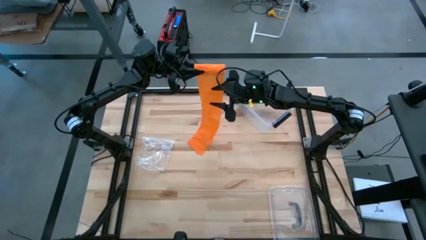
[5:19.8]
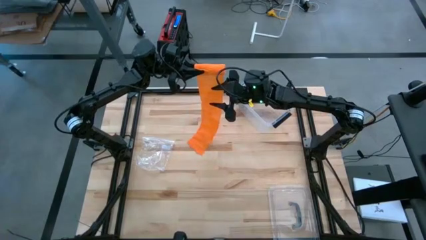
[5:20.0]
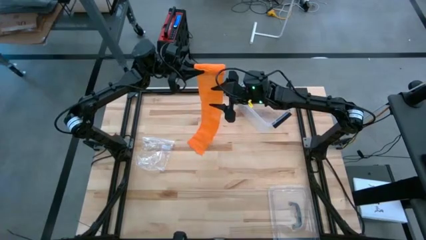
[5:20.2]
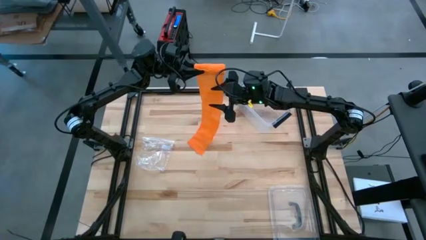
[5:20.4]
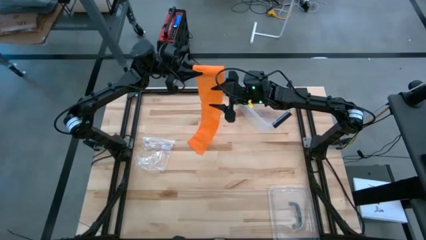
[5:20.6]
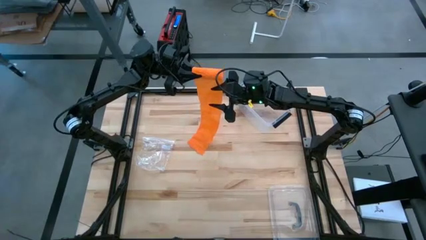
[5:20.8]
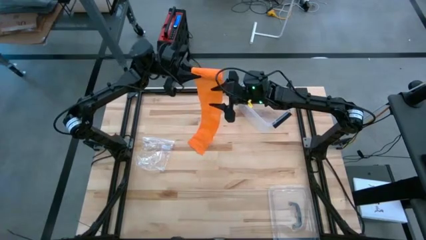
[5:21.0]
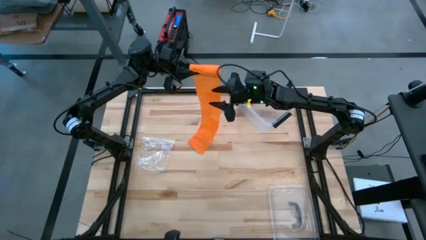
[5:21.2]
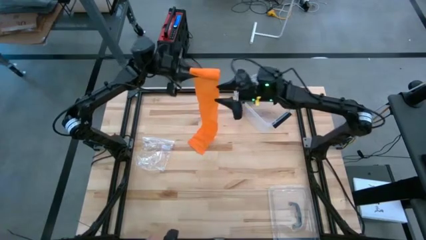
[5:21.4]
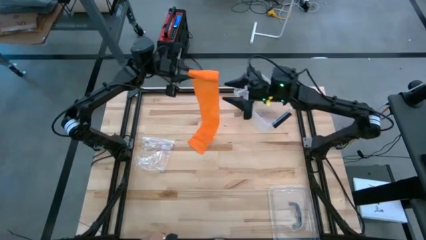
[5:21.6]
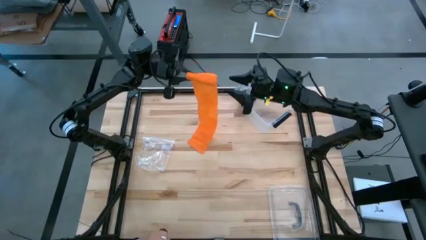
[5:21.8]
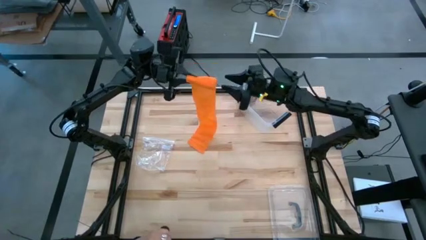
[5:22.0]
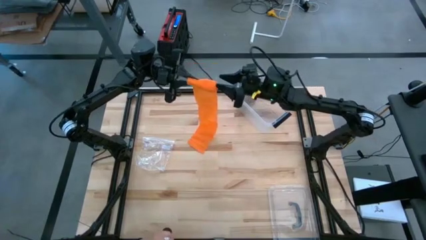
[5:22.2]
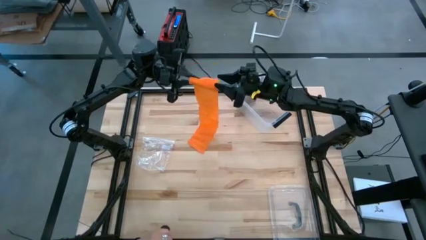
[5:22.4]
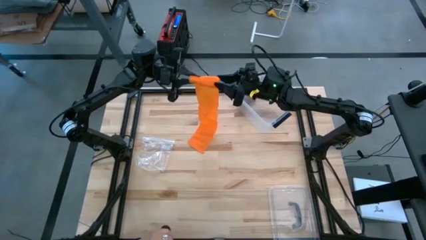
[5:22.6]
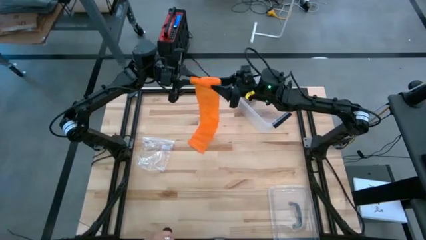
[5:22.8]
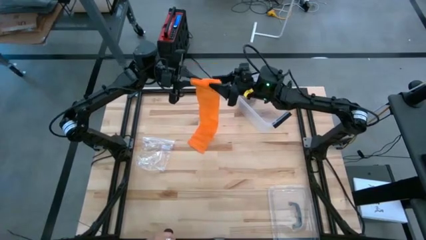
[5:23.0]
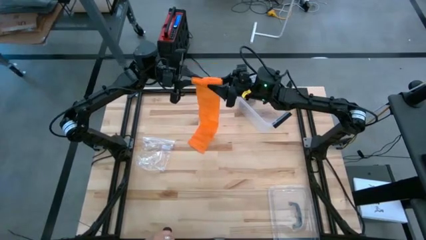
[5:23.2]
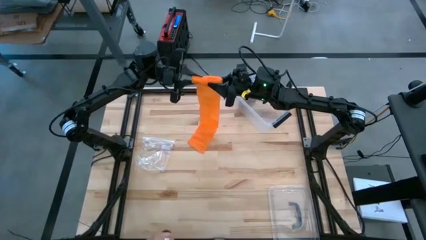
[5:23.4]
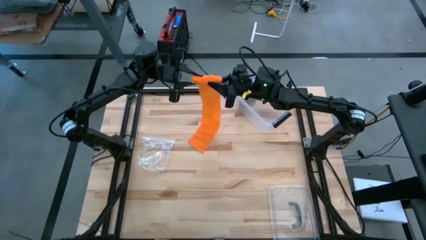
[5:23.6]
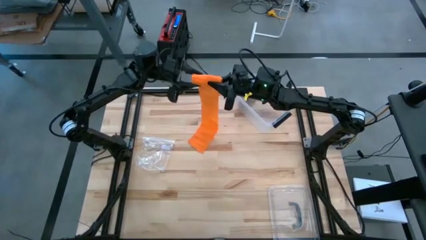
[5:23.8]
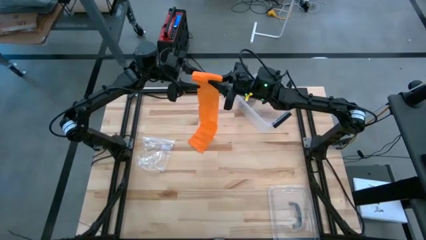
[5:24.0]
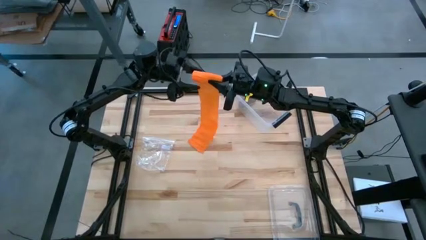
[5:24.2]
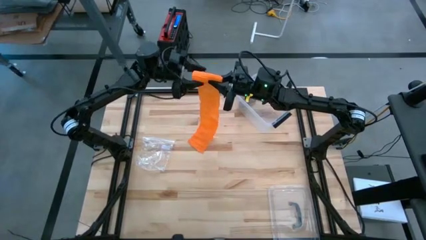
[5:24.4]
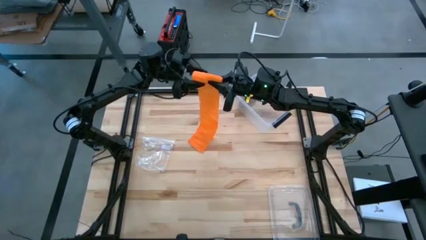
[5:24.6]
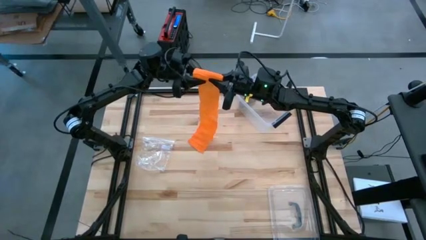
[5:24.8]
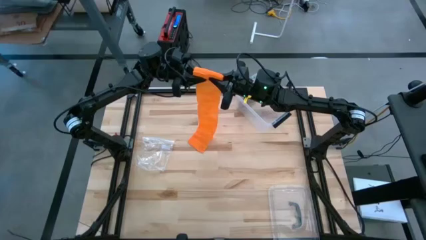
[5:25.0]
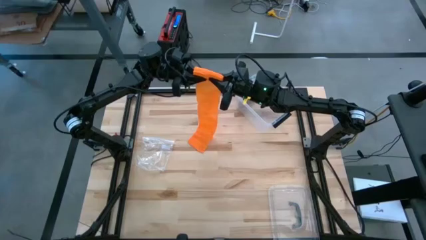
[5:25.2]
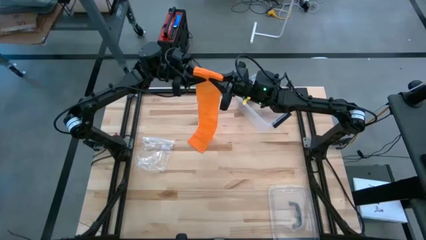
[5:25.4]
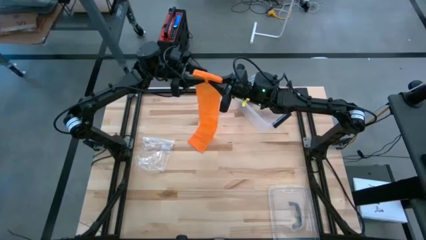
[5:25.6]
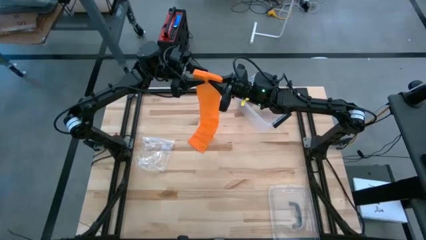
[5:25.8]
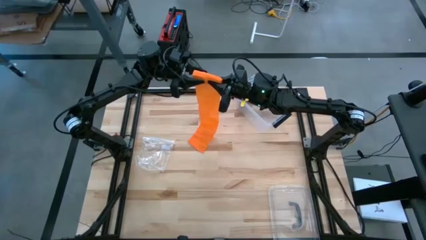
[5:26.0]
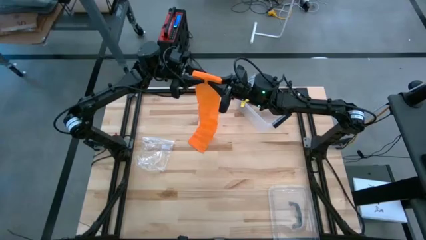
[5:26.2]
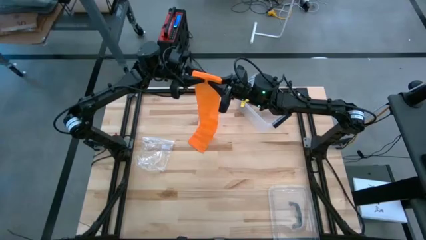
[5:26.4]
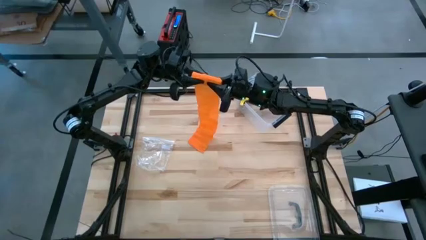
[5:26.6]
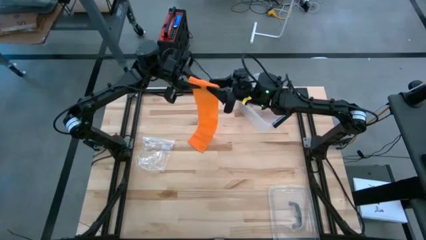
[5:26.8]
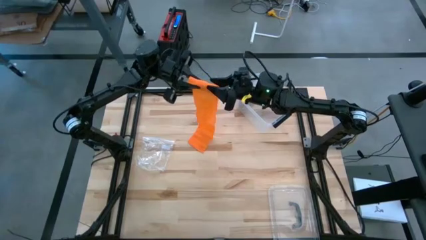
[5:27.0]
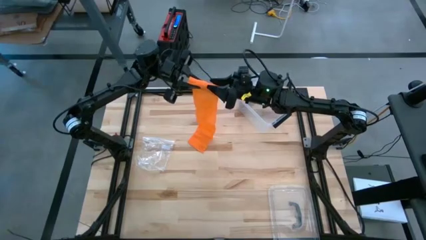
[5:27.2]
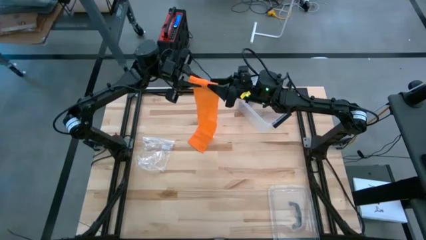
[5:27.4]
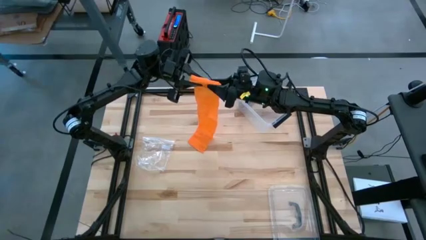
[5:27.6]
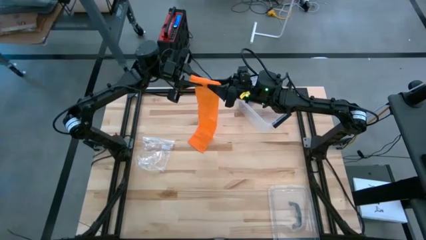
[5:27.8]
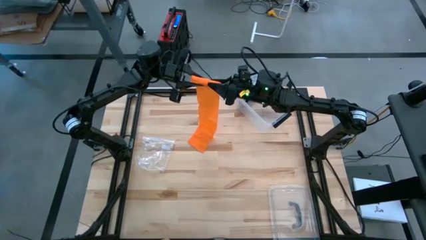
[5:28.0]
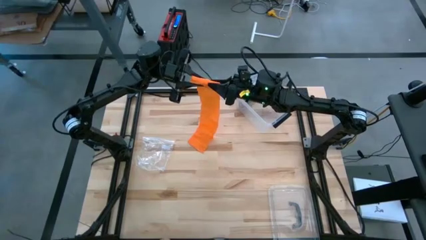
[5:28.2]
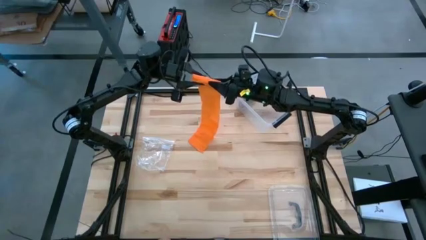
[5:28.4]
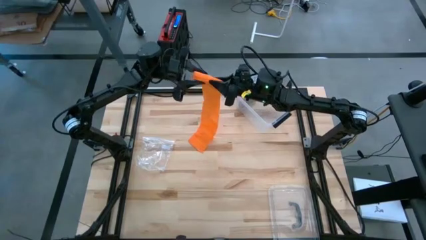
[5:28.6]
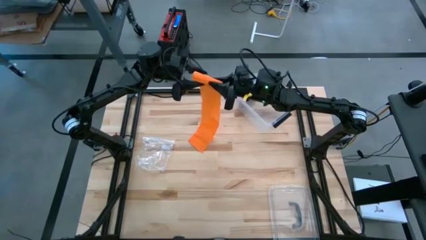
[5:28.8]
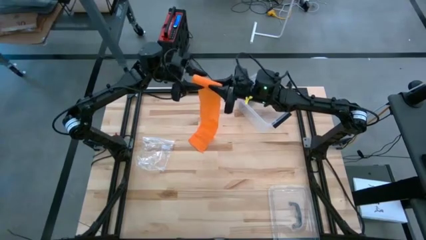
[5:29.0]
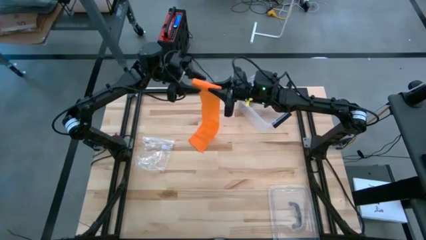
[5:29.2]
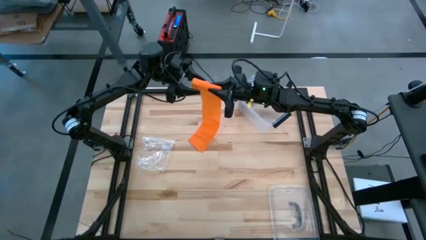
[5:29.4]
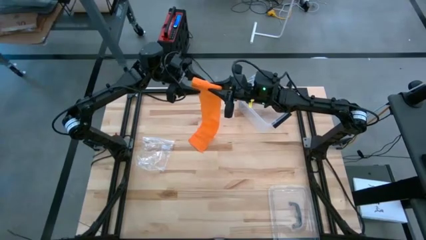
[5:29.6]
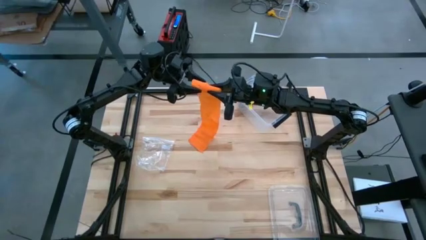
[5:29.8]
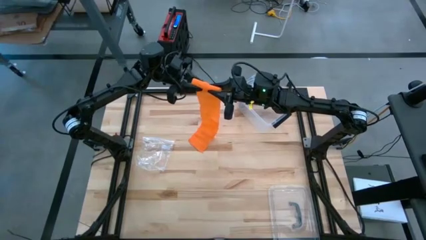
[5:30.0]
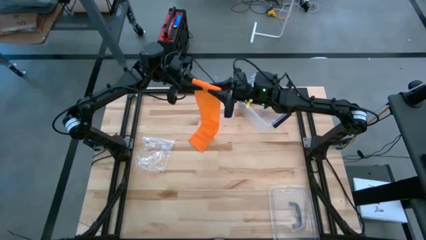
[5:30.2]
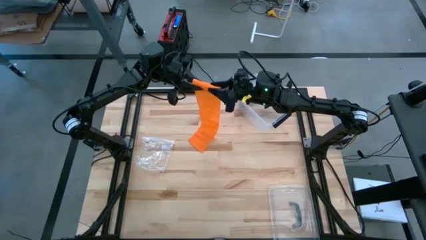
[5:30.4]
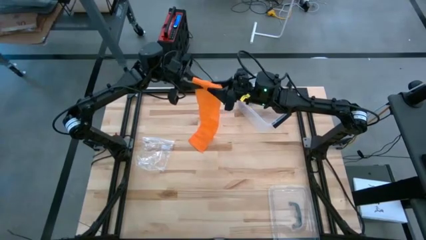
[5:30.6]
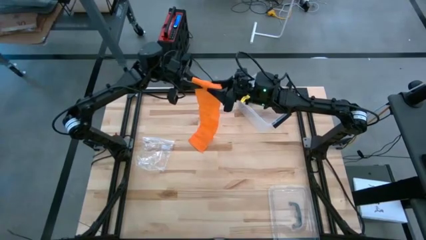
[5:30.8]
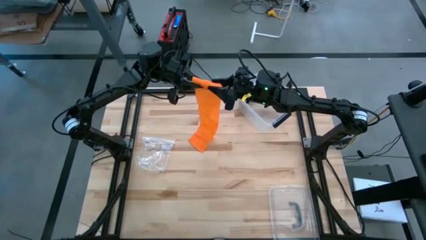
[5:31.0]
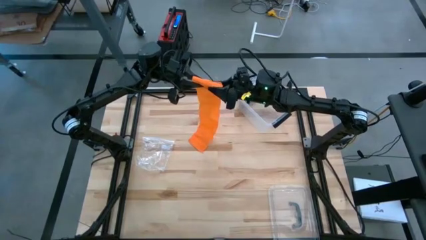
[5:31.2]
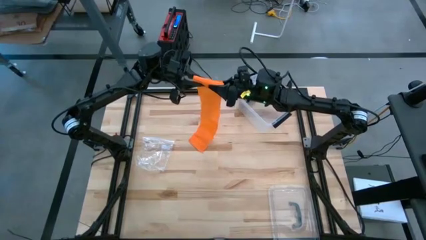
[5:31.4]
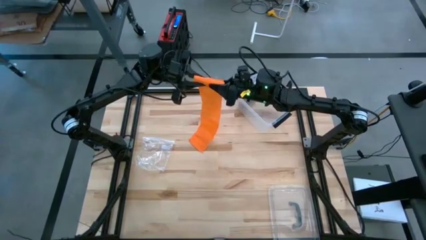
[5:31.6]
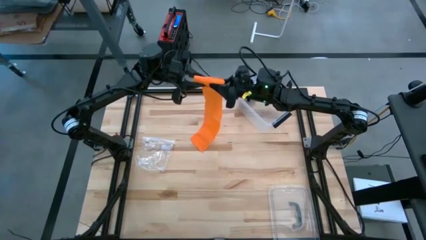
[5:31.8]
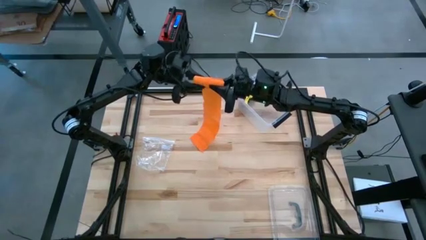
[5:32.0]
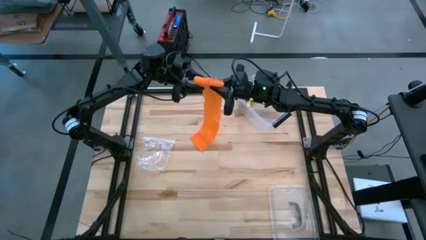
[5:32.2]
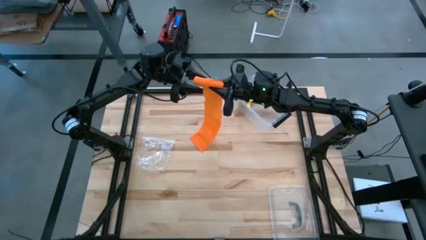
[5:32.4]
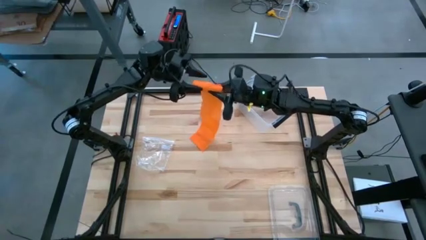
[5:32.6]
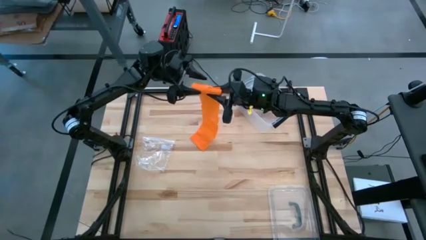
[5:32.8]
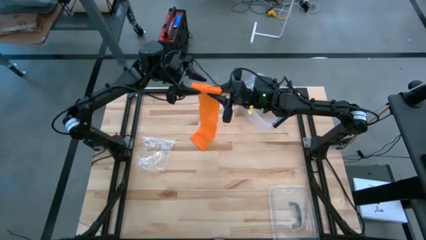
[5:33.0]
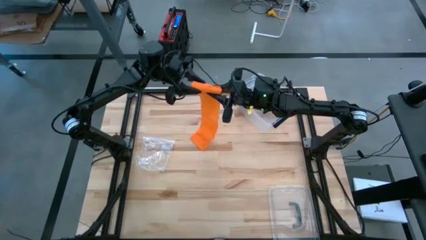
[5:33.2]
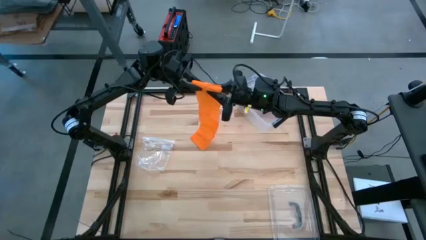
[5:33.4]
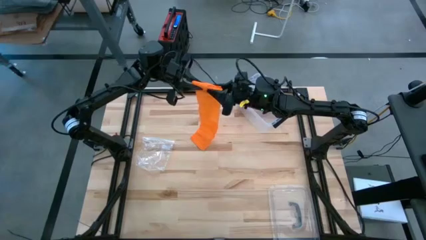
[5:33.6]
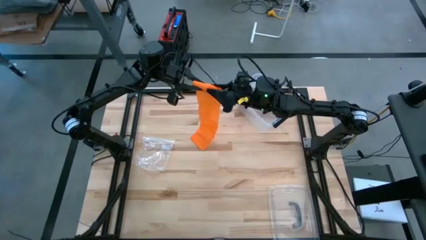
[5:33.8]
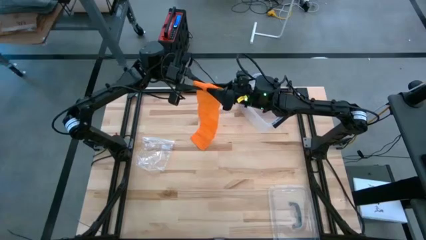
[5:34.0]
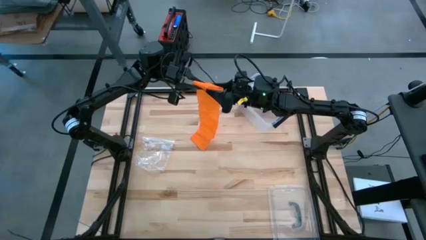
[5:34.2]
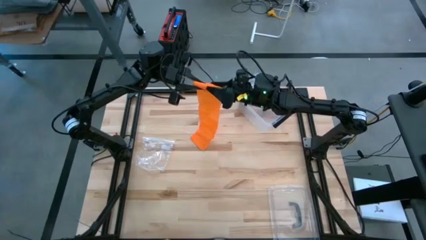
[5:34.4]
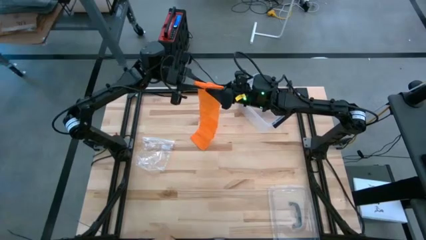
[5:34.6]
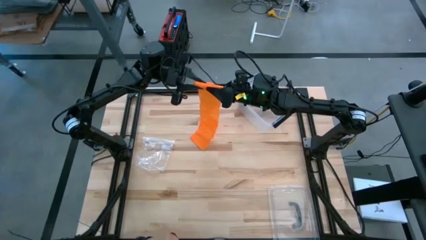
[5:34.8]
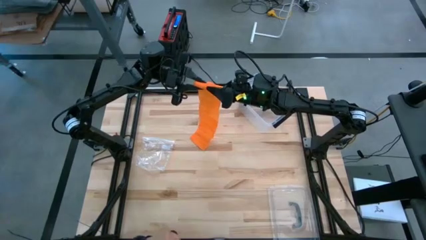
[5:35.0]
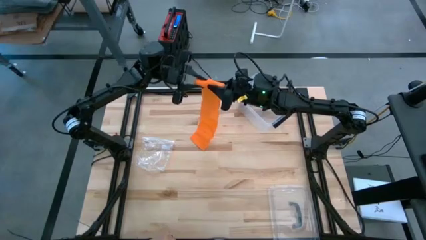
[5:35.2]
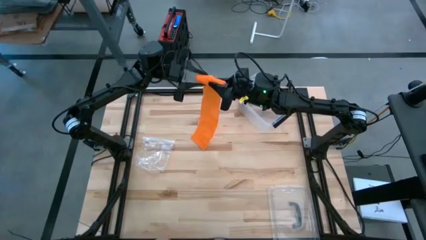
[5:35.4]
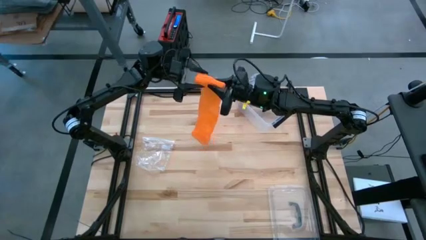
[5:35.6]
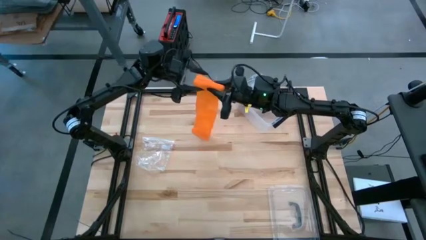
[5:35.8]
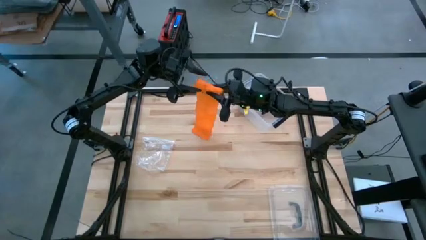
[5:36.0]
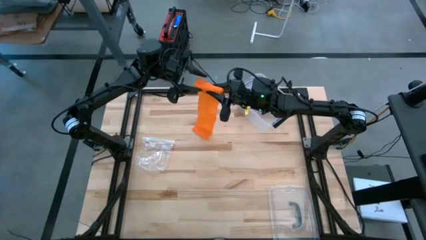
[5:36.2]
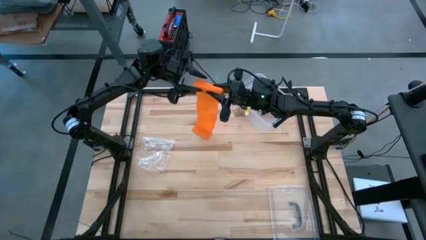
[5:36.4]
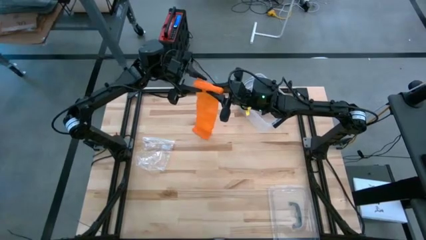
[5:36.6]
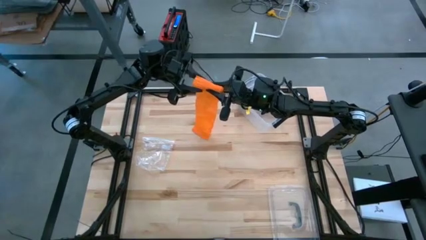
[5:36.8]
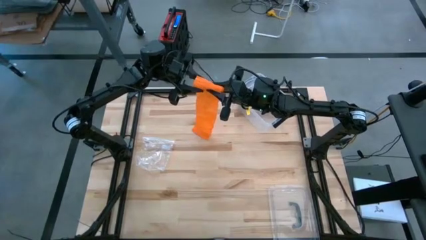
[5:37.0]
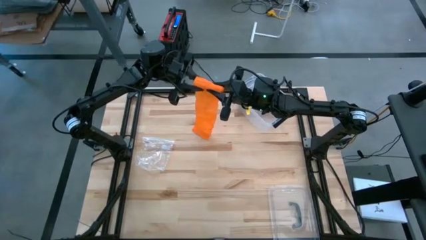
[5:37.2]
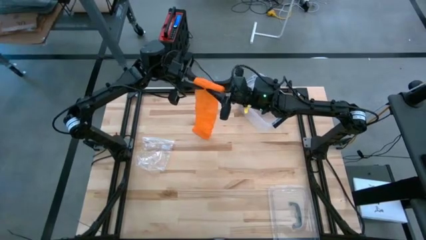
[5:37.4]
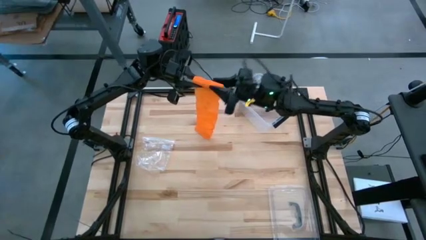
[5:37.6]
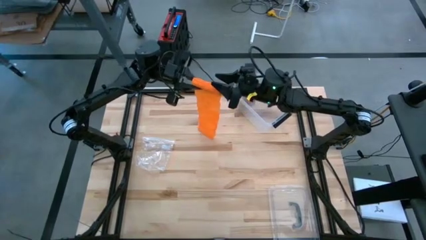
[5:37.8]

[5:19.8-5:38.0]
Task: Roll bandage
Roll the orange bandage on the table
